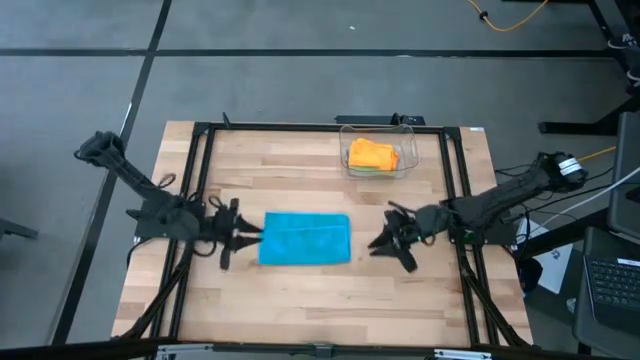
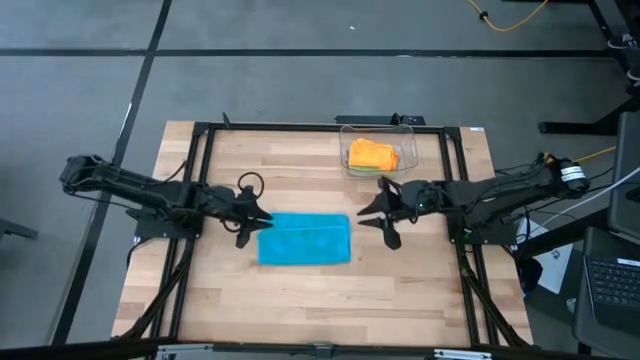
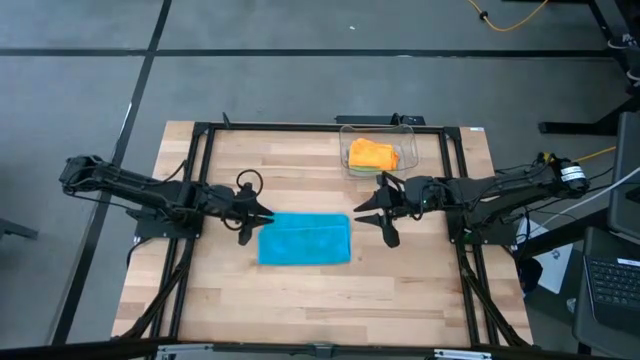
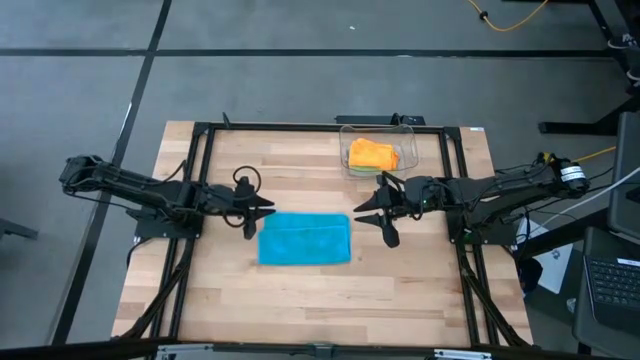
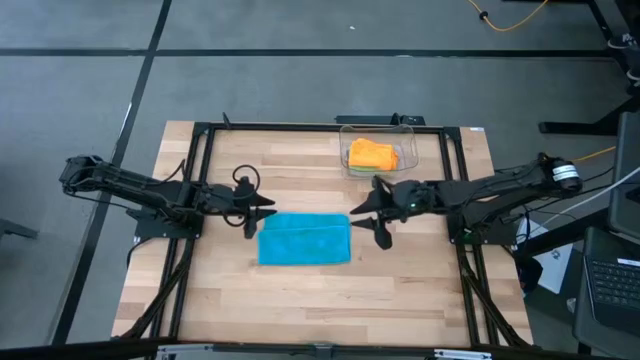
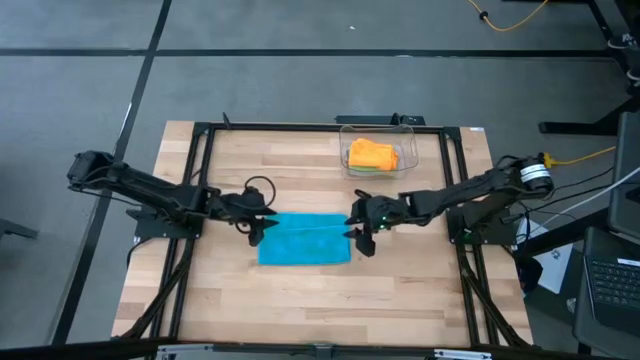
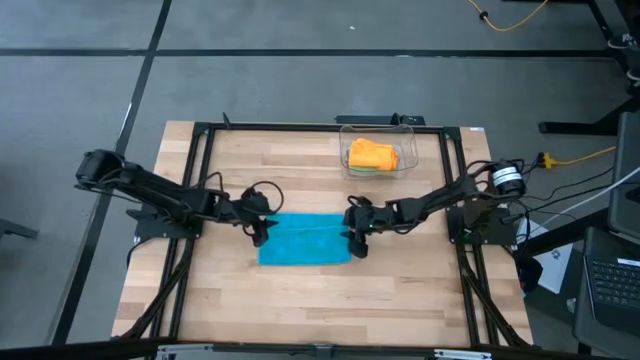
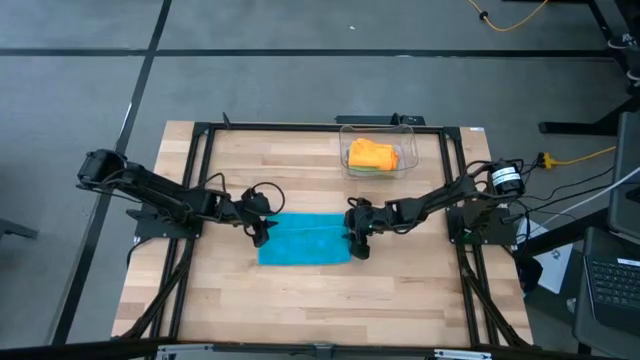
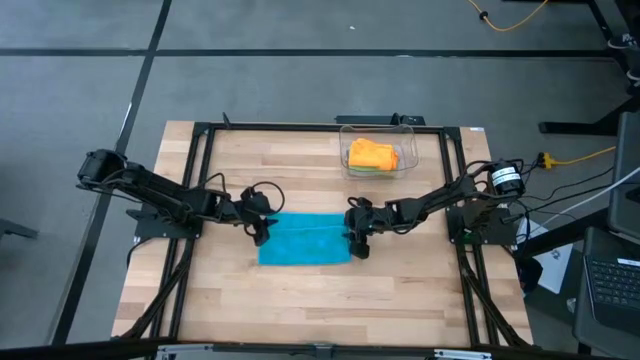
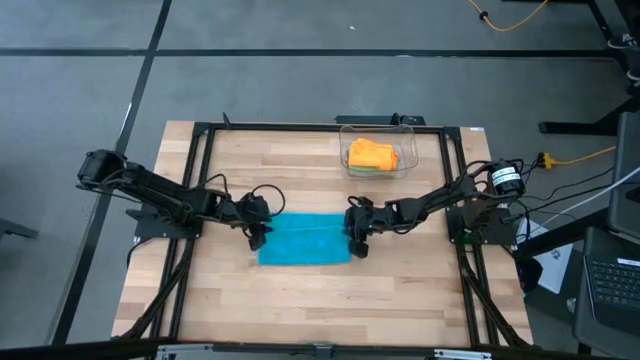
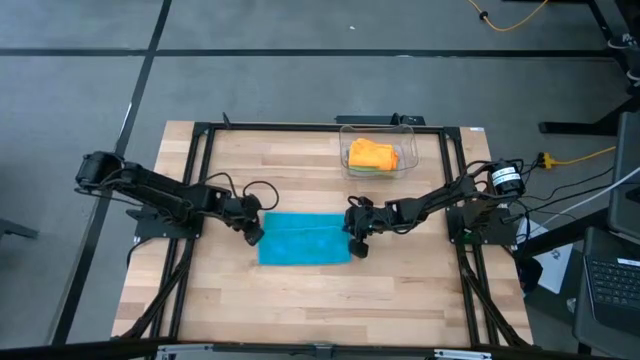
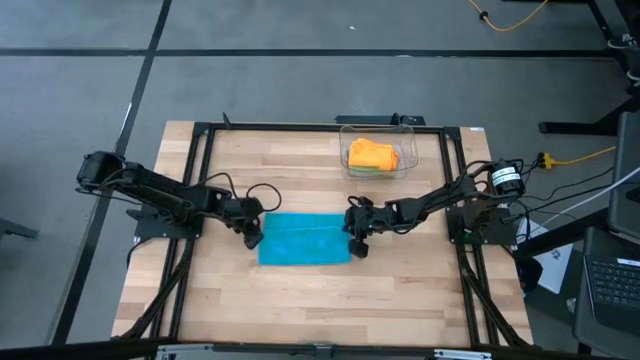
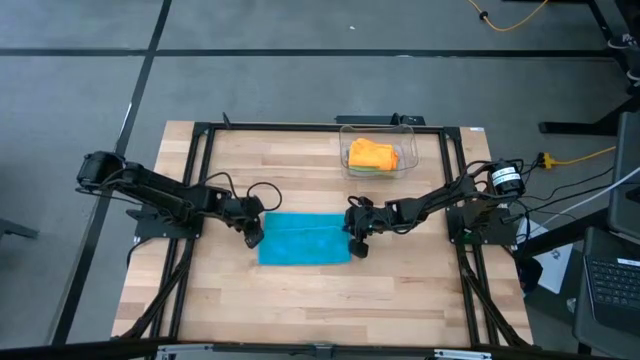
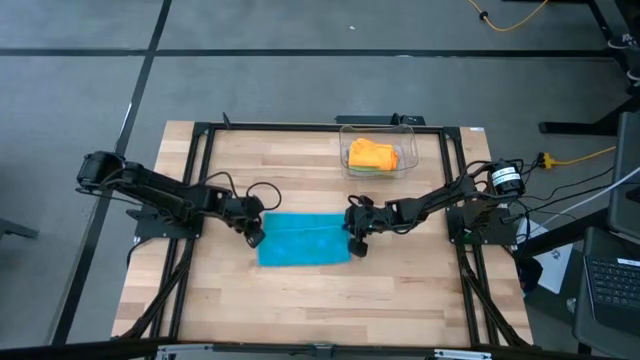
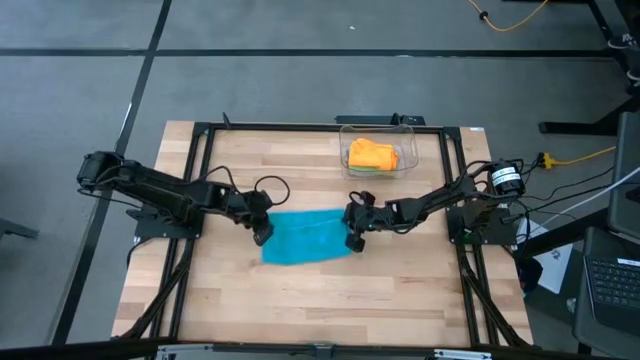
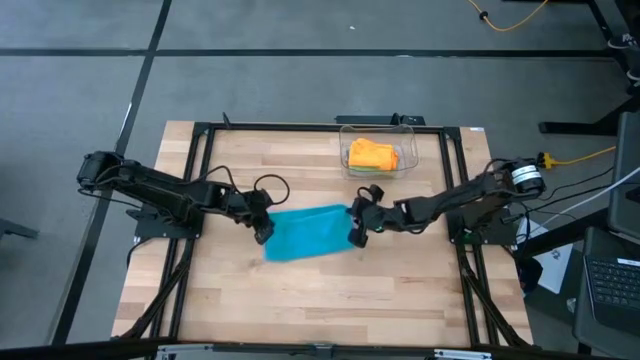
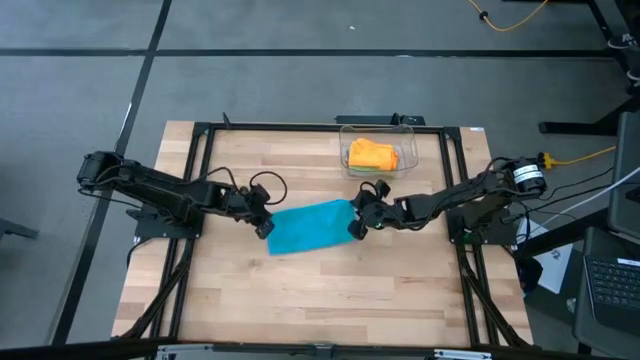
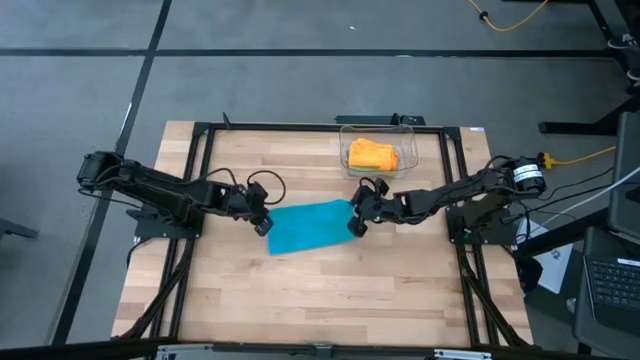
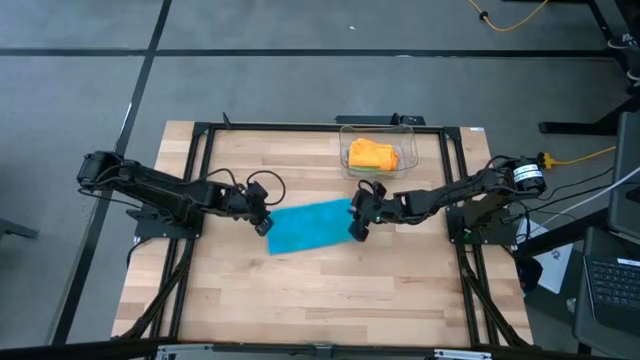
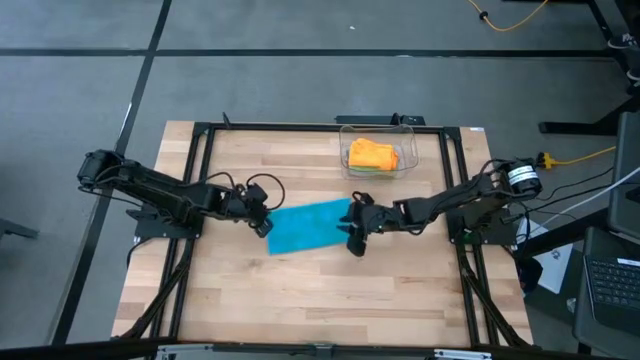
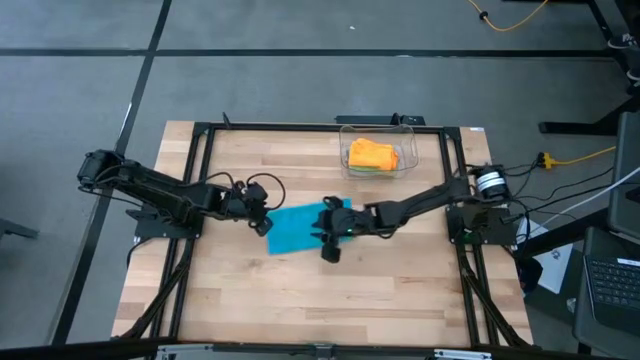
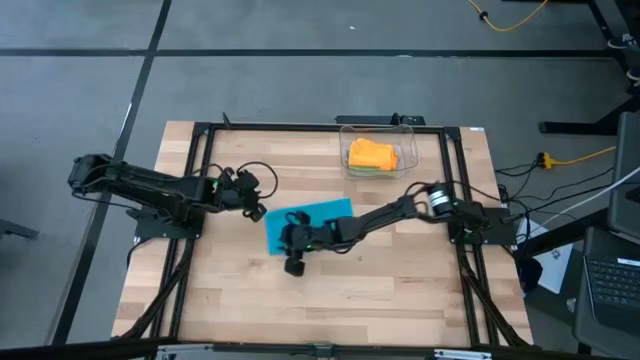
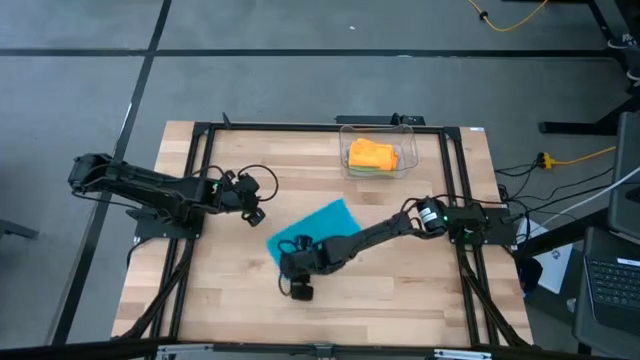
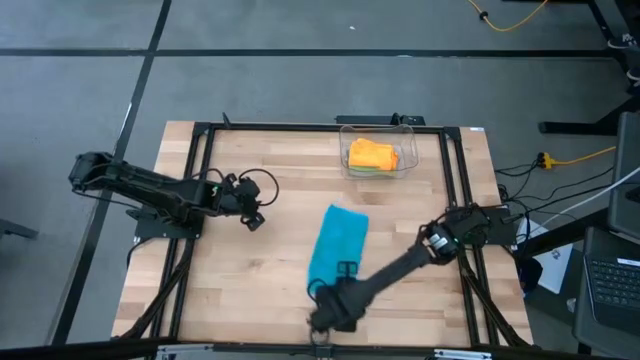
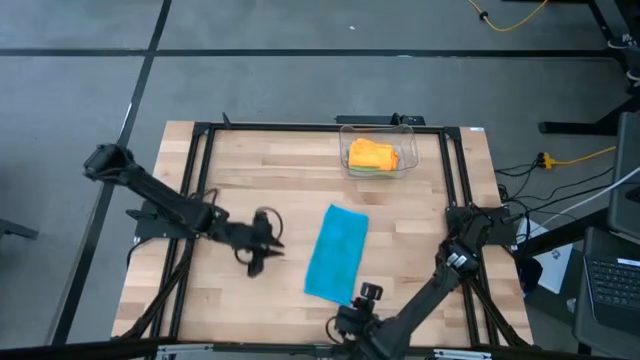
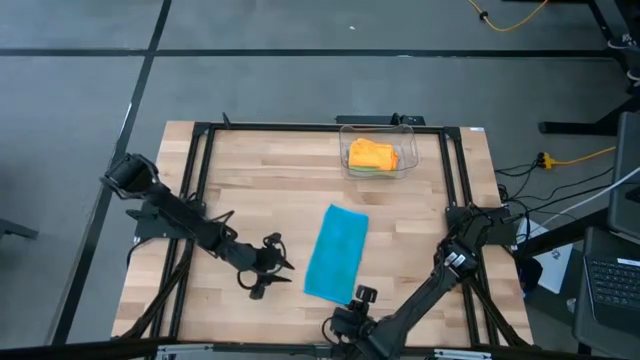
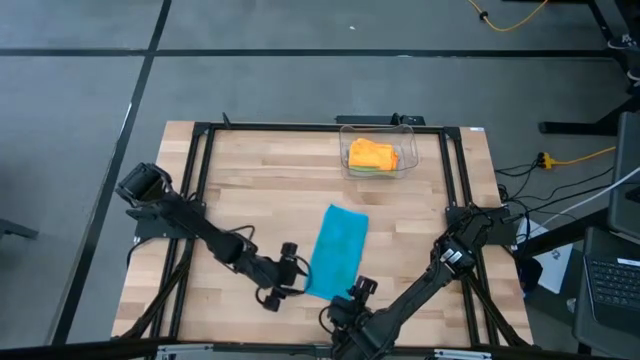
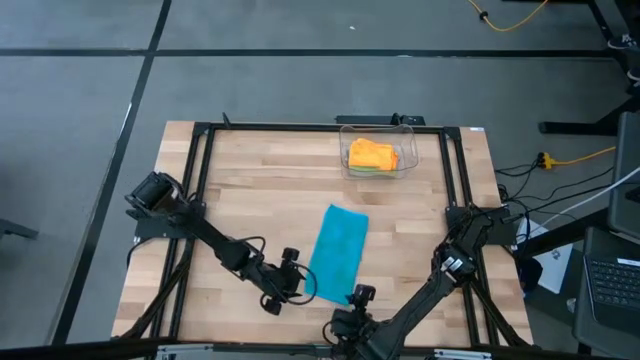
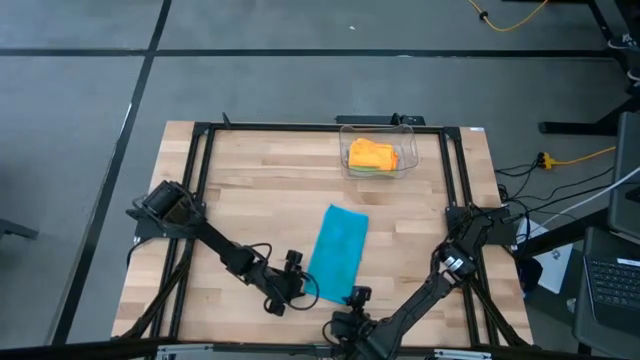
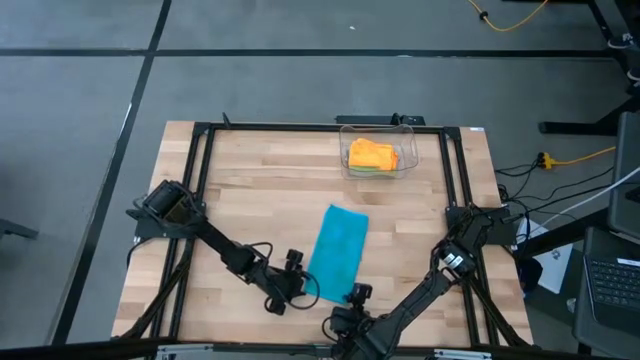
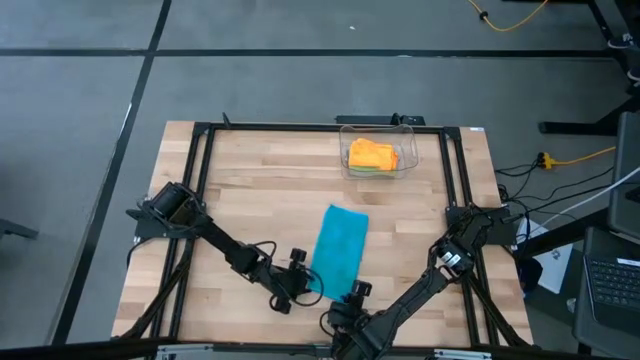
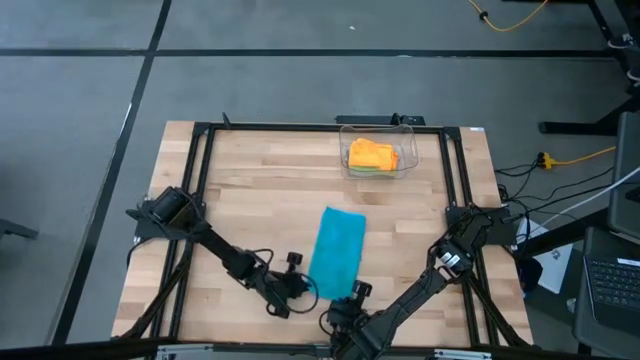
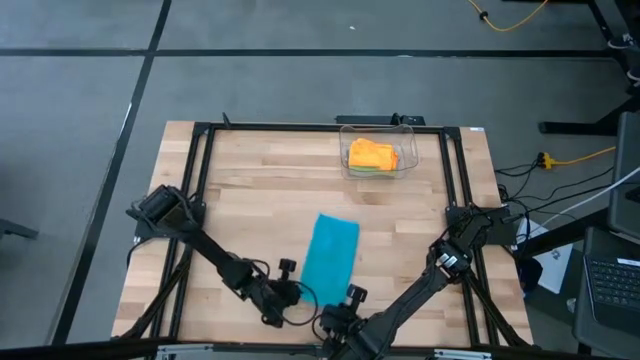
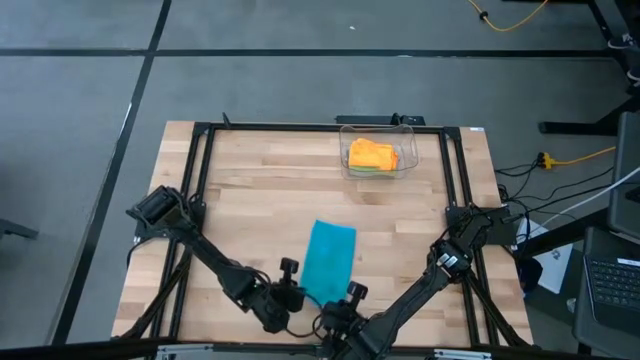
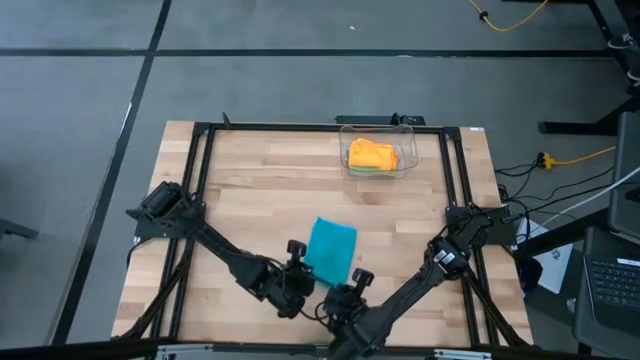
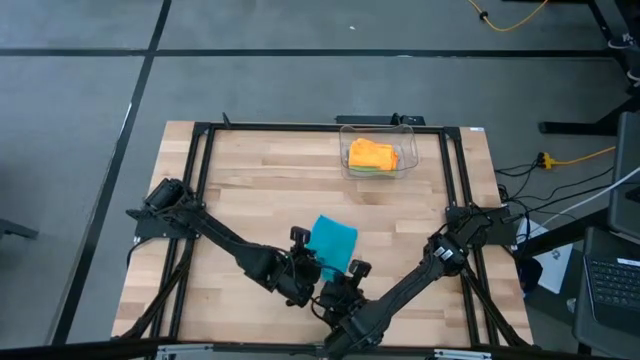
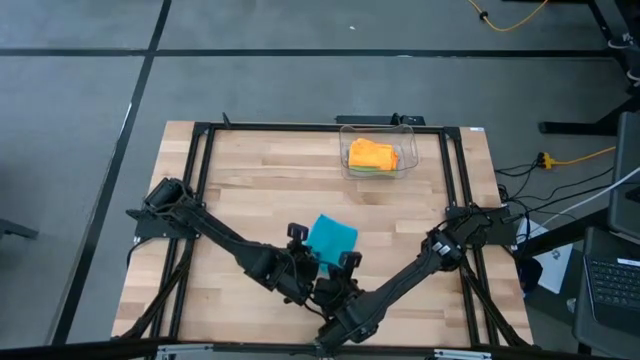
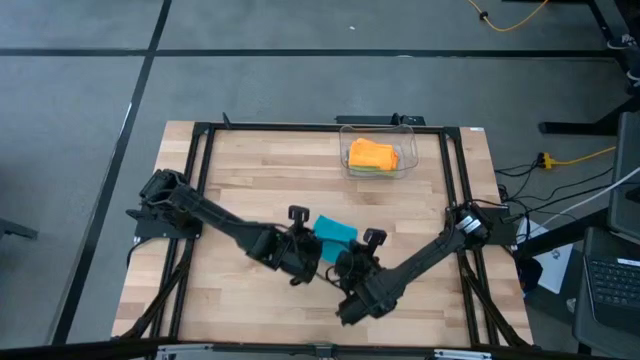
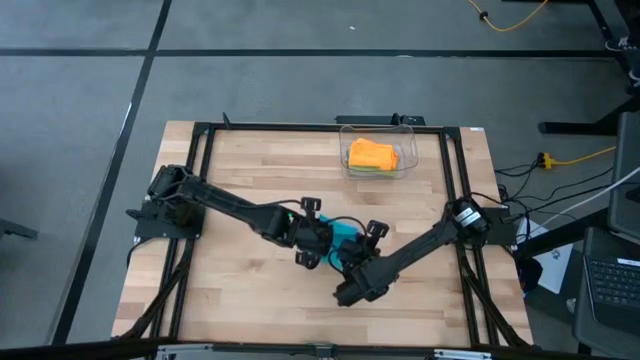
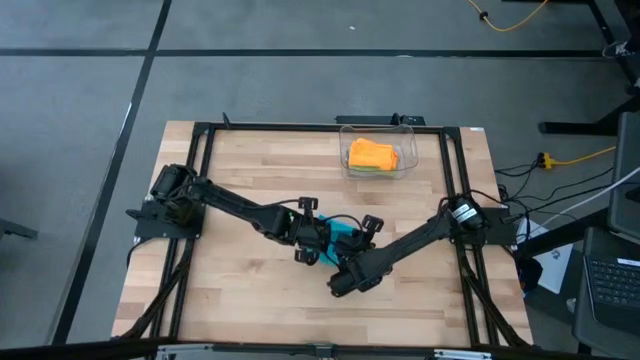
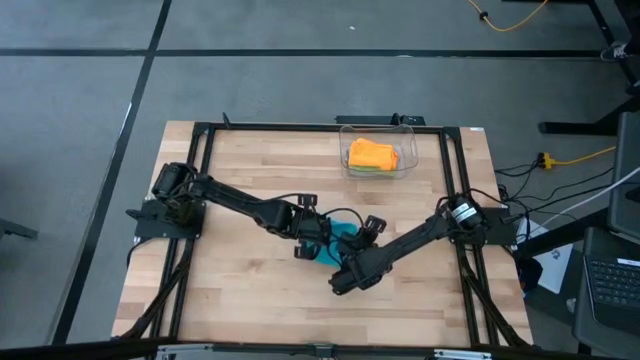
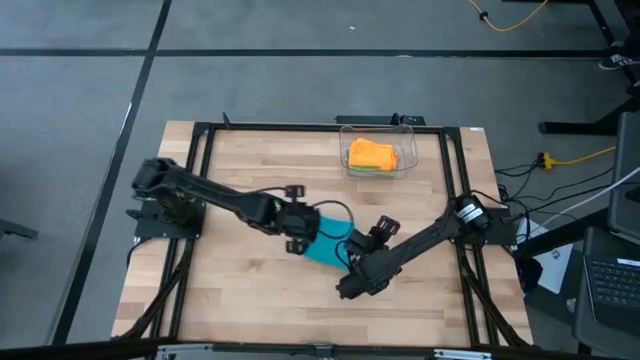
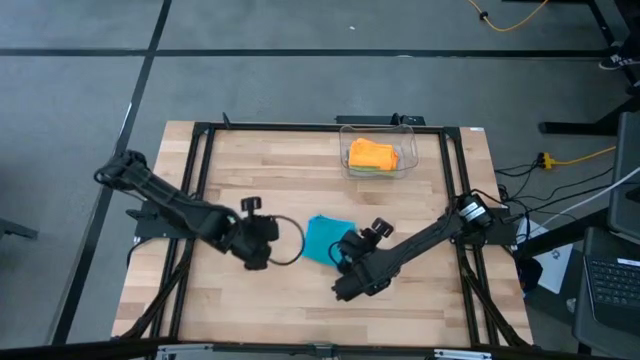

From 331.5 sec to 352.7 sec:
Task: Fold microfiber towels
Fold the blue microfiber
